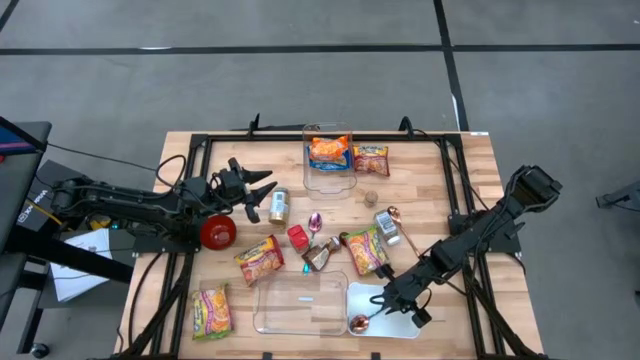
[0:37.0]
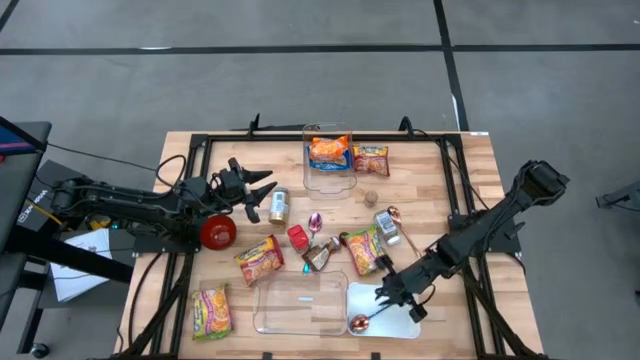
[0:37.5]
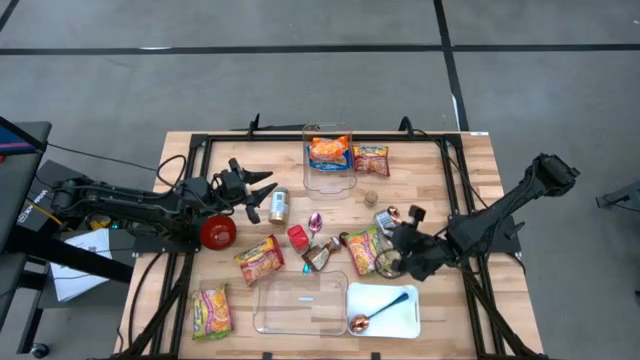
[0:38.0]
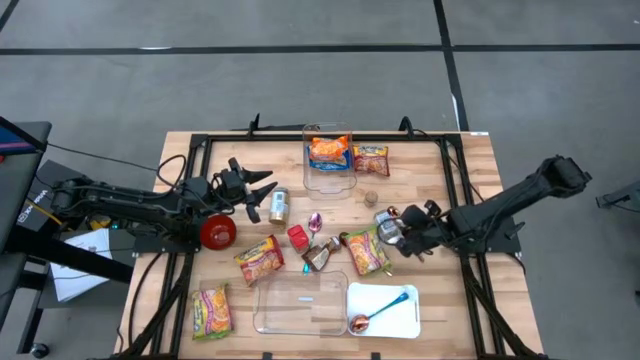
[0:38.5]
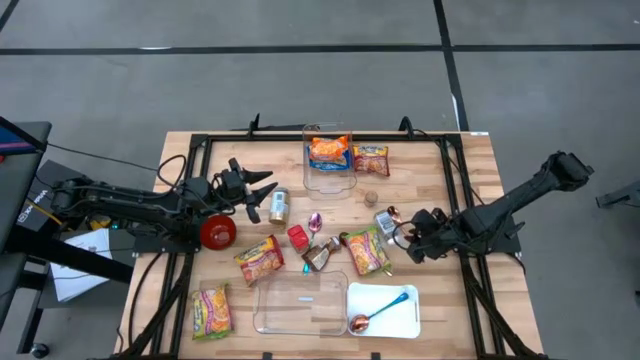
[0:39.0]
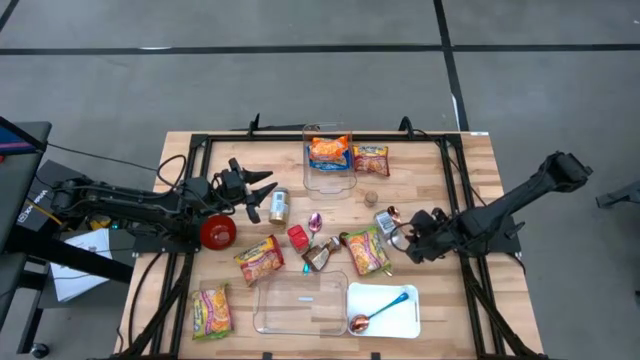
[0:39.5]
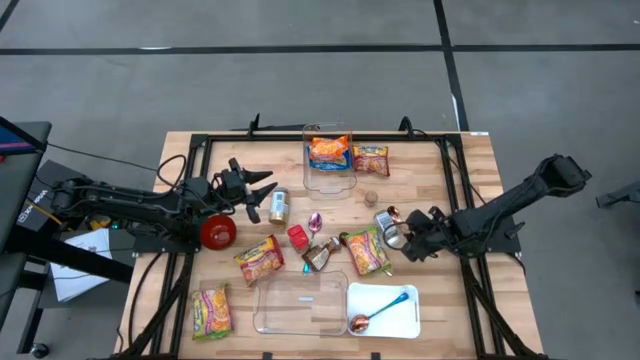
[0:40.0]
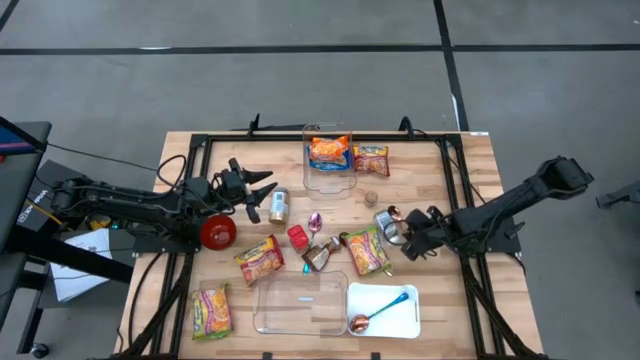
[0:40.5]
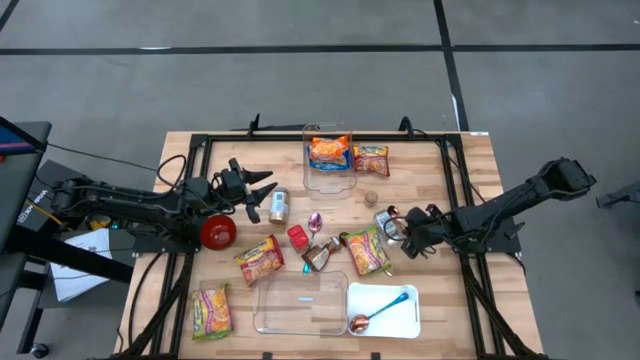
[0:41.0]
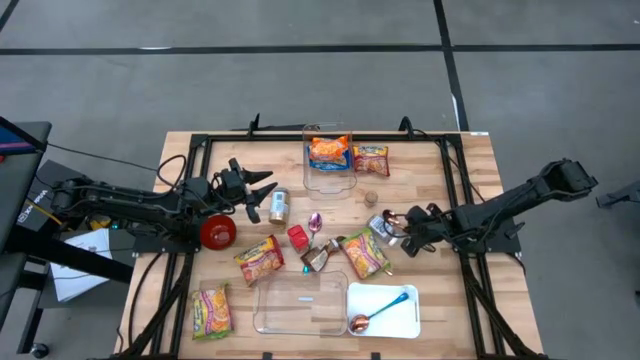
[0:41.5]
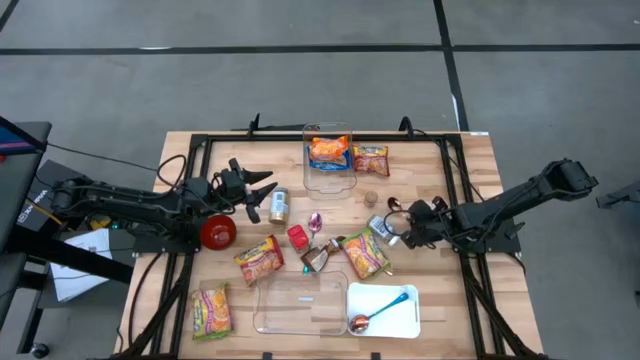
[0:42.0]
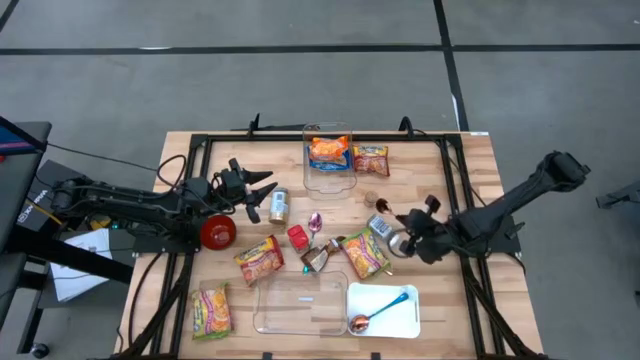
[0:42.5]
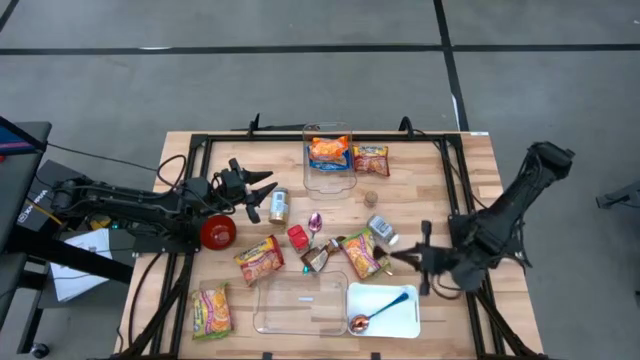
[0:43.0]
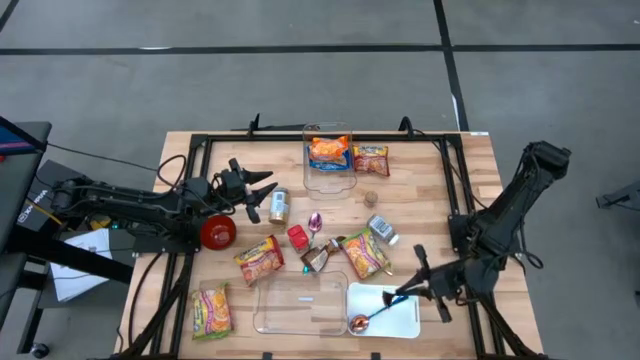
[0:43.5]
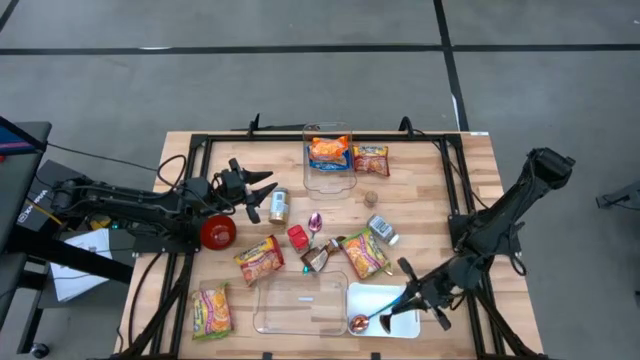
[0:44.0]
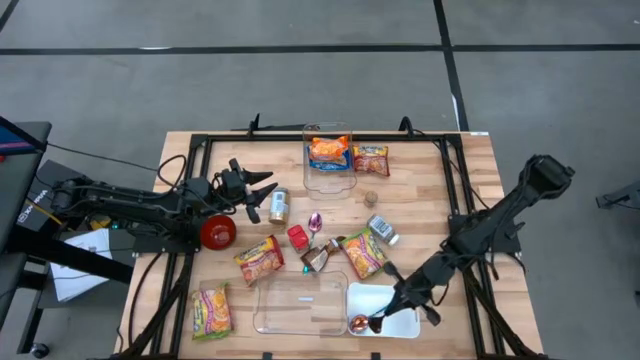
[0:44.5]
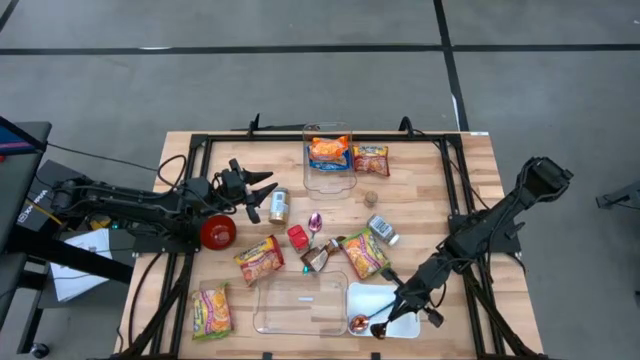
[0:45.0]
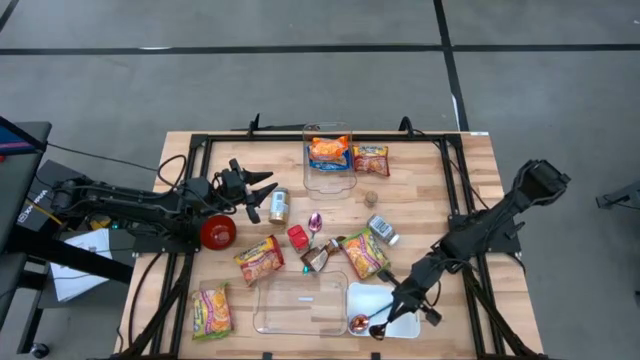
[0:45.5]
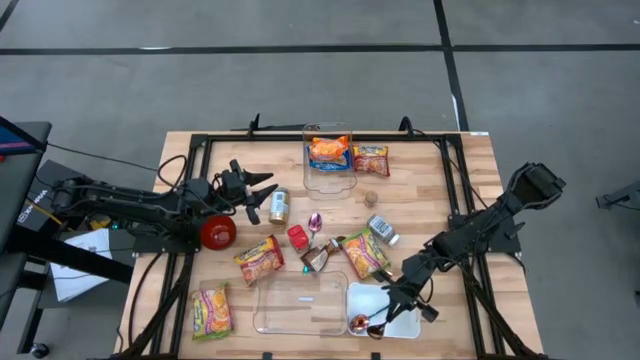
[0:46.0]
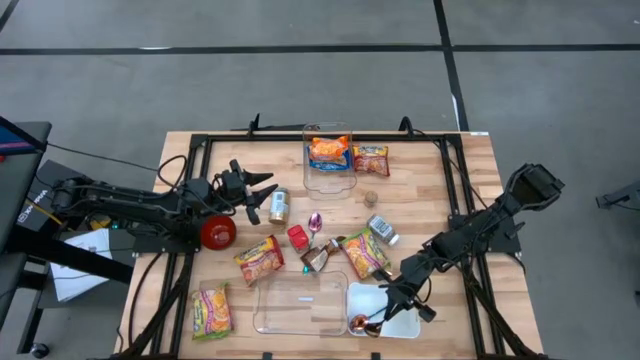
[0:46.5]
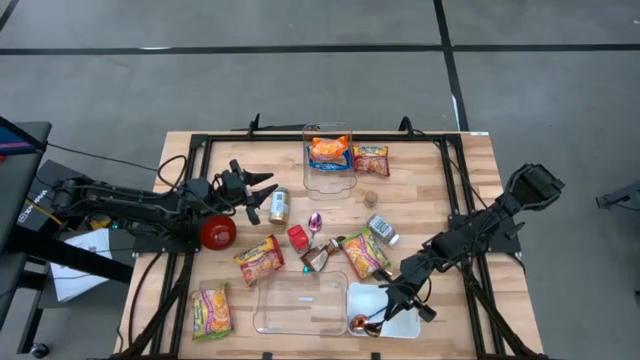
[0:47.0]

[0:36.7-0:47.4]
Task: Pick & Place Food Item
Put the gold spoon into the white bin

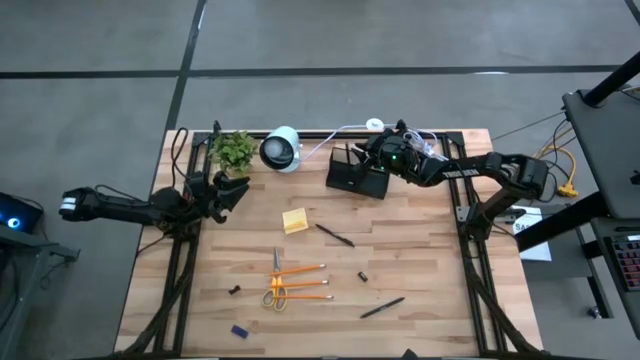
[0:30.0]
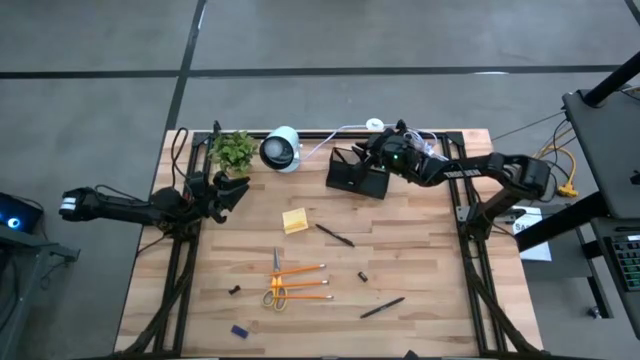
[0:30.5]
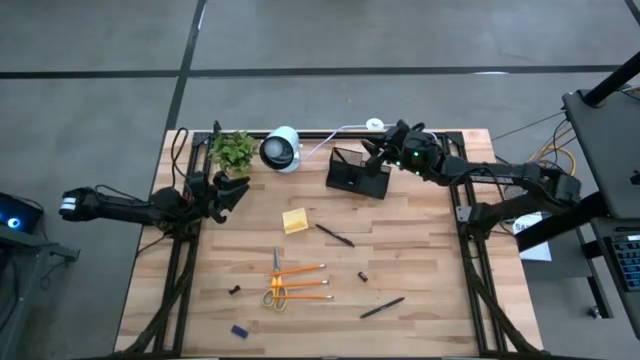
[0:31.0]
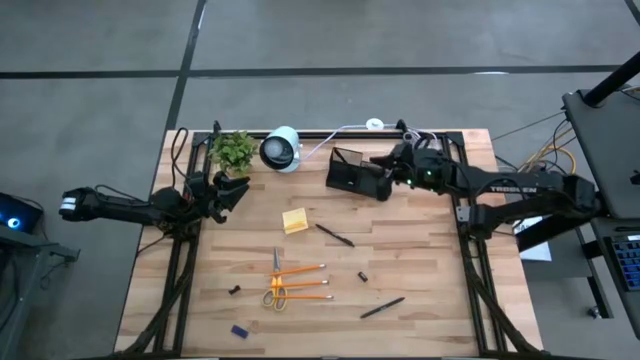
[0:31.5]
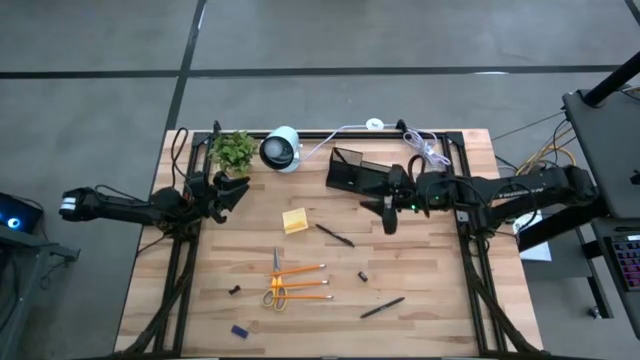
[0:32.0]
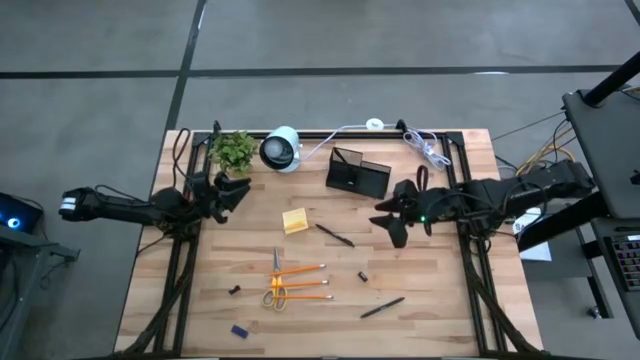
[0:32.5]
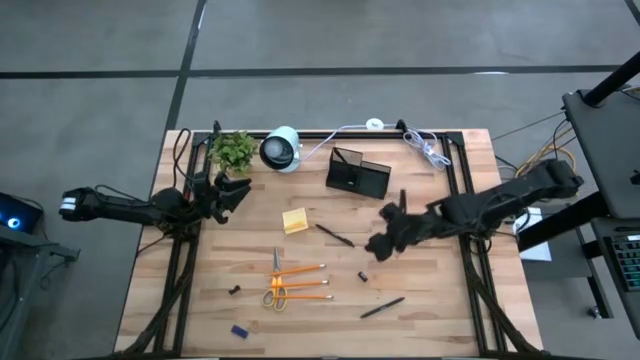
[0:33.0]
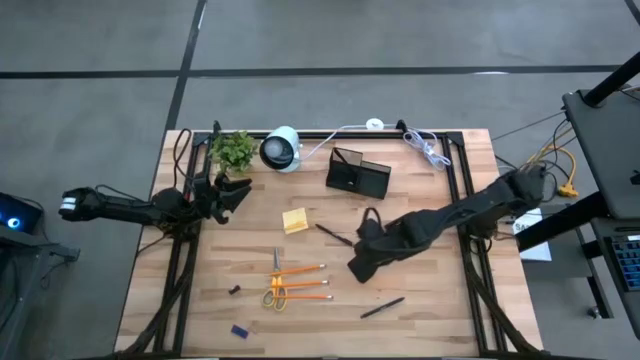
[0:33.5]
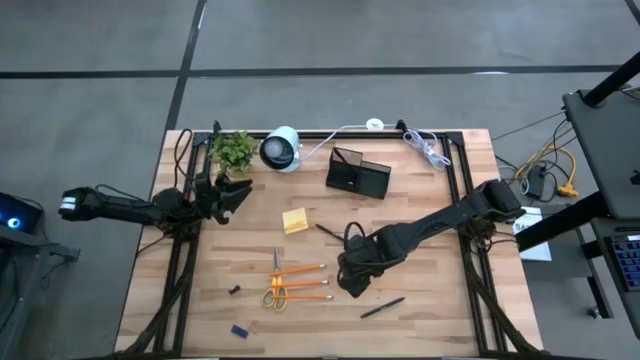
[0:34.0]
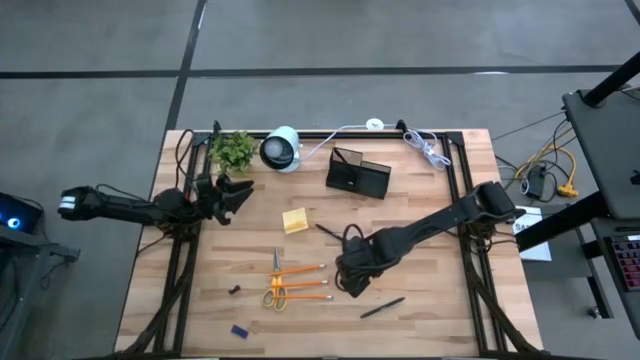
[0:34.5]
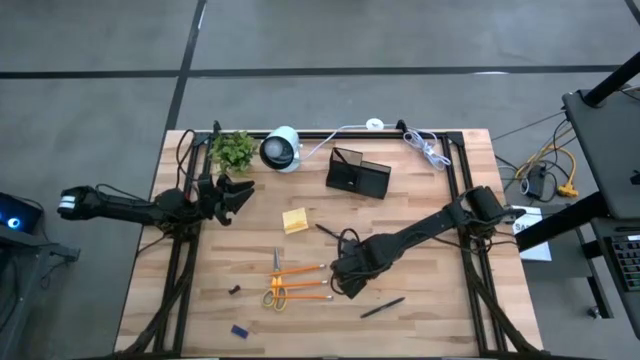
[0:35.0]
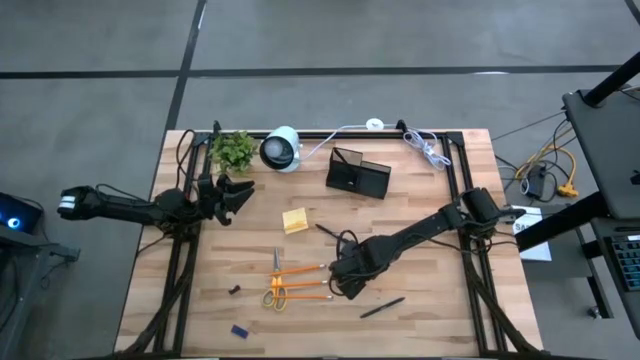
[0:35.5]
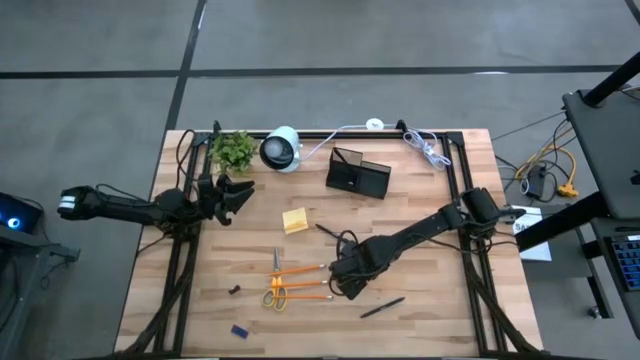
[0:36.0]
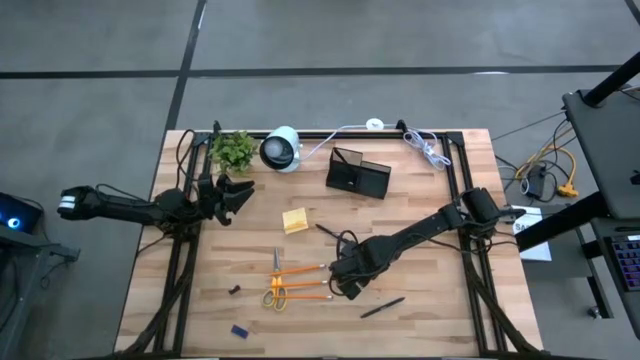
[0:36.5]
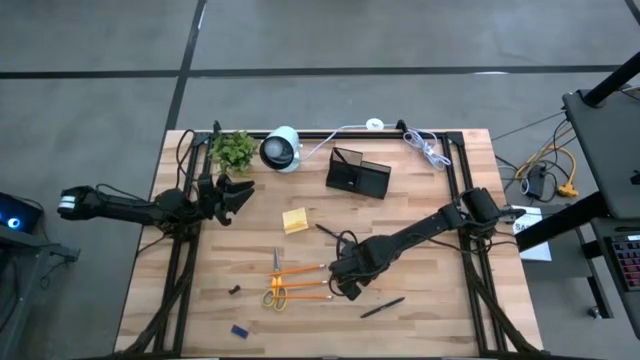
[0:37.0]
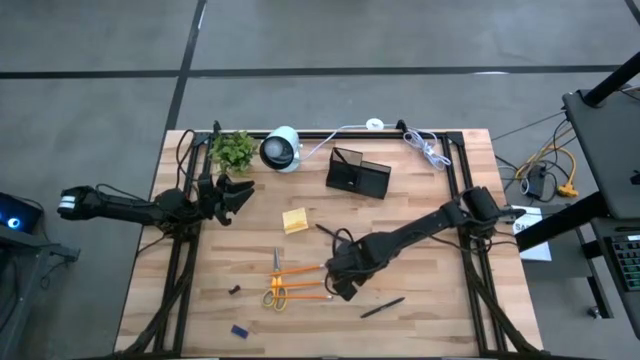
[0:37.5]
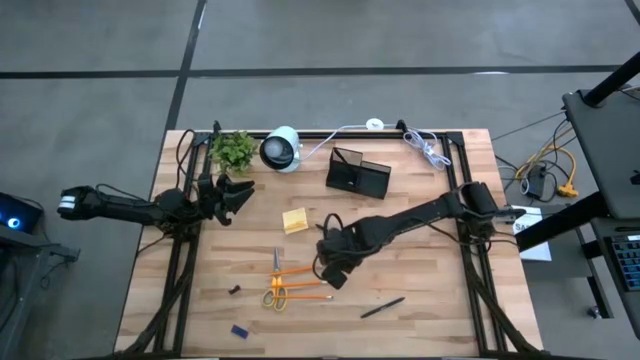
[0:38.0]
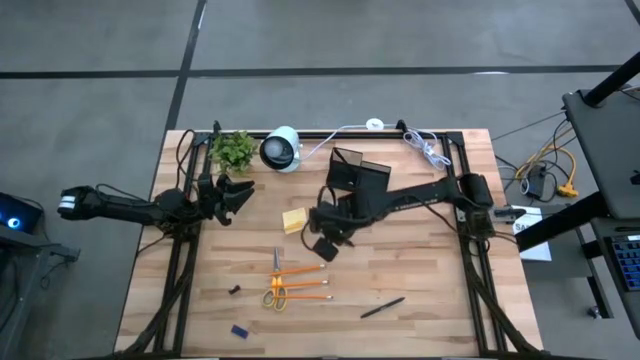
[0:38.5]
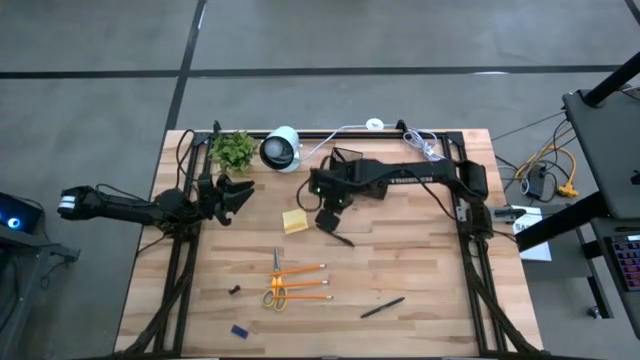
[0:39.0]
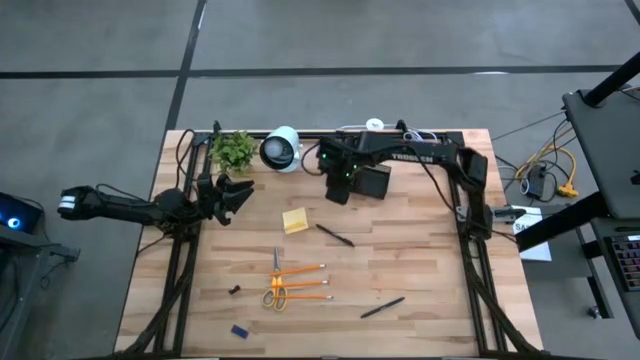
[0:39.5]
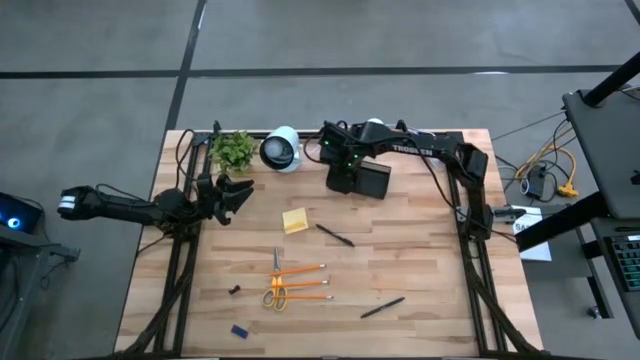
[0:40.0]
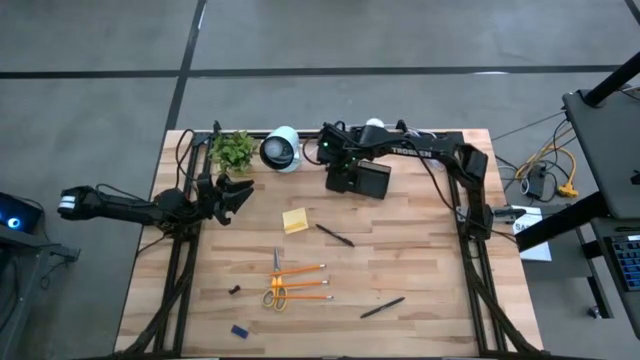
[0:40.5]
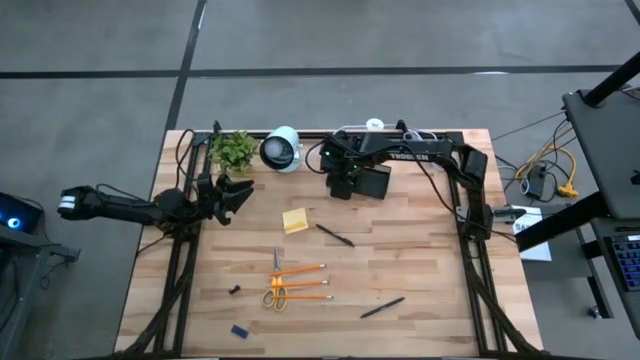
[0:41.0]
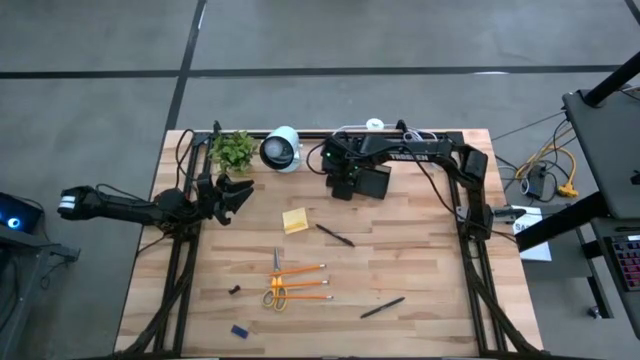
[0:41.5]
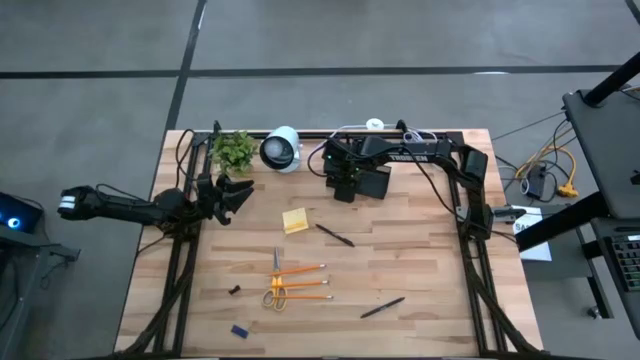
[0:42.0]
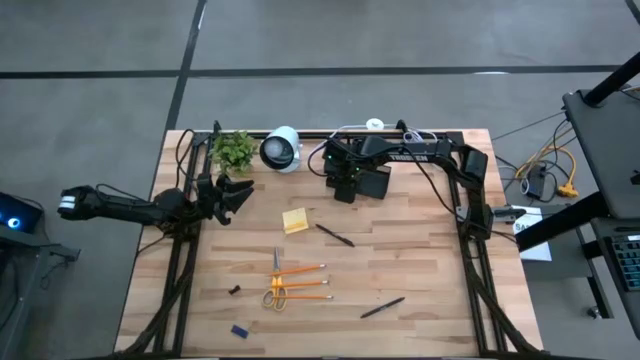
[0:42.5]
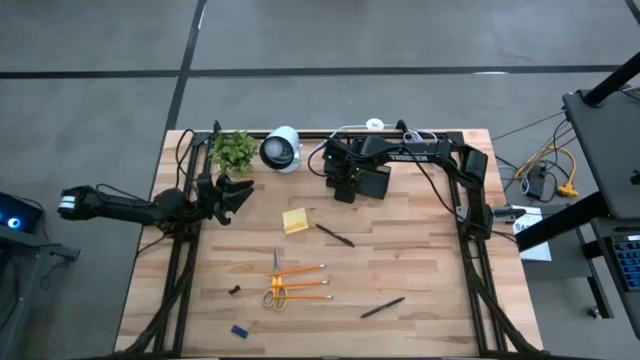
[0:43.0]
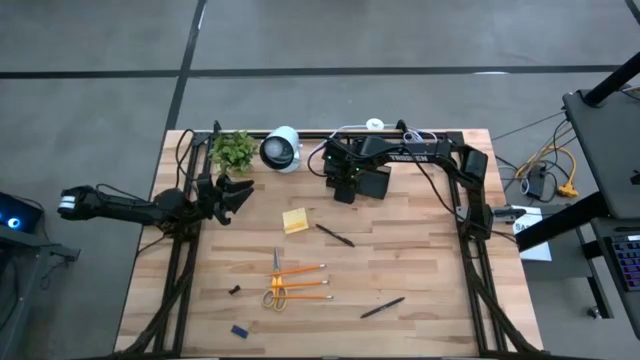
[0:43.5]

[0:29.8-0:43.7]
Task: Pick and place office supplies into organizer
Put the right binder clip into the desk organizer
